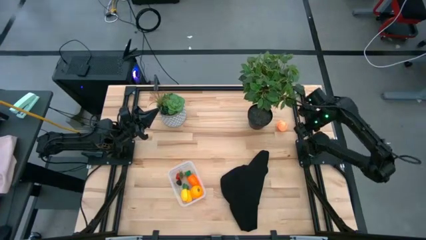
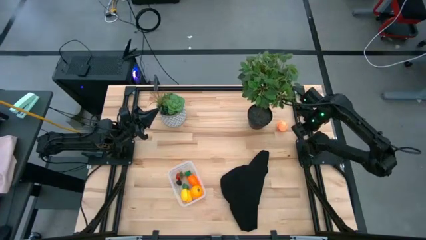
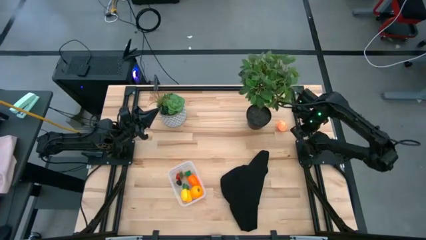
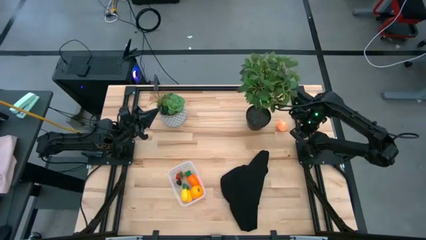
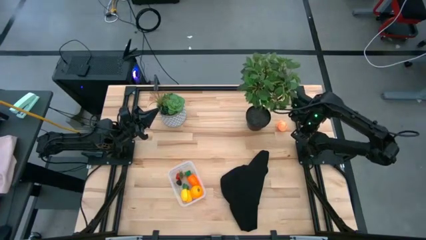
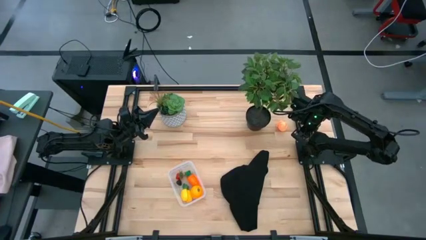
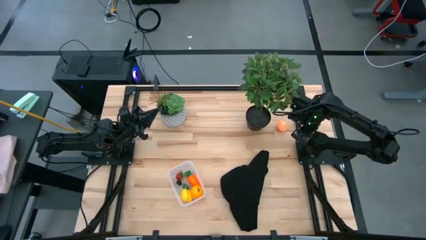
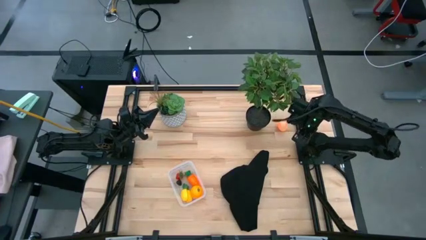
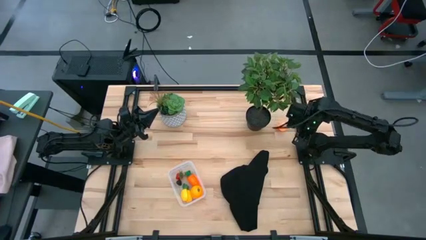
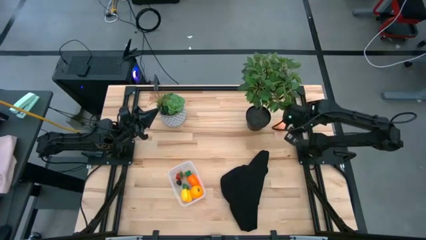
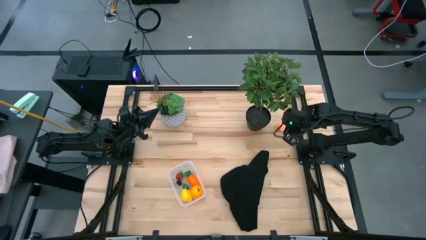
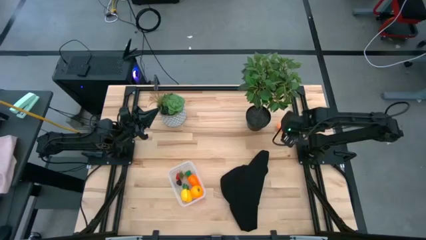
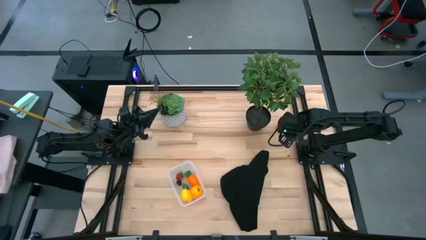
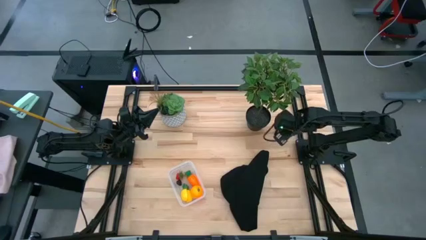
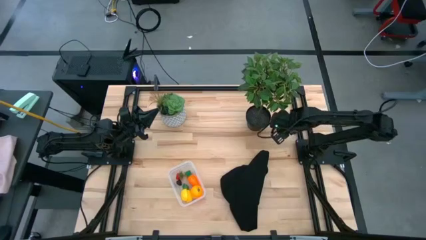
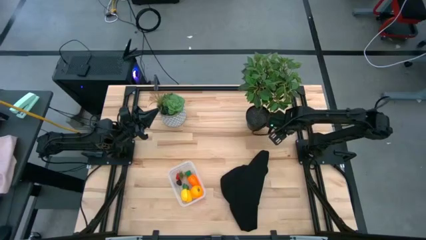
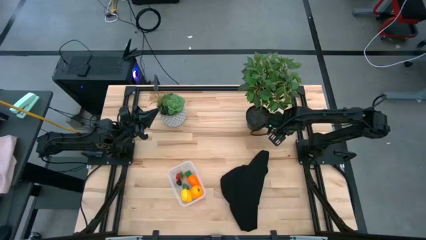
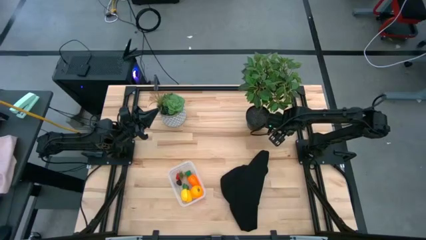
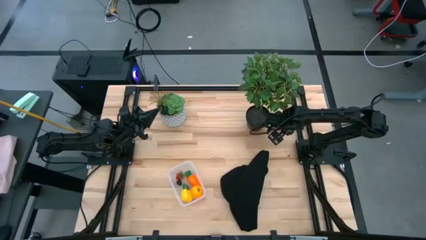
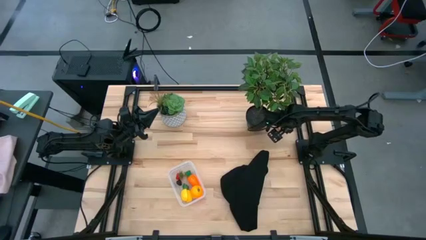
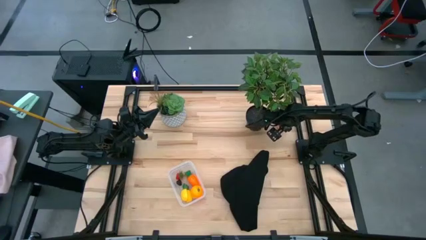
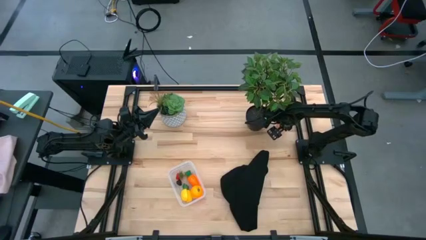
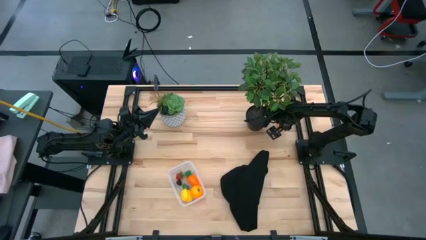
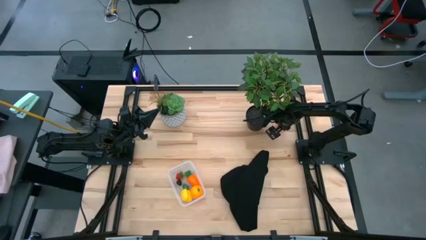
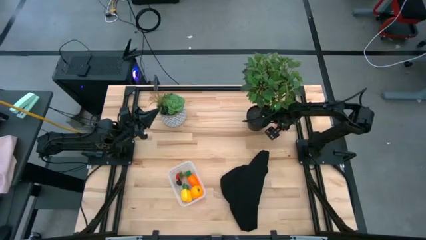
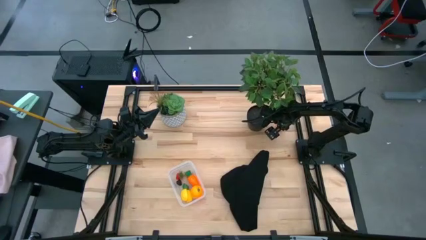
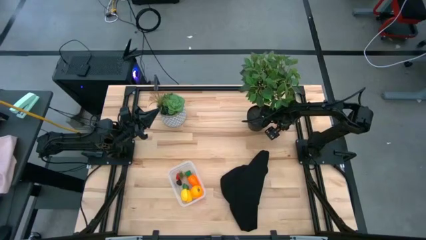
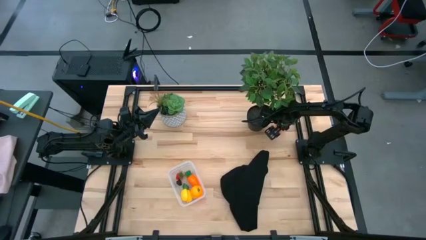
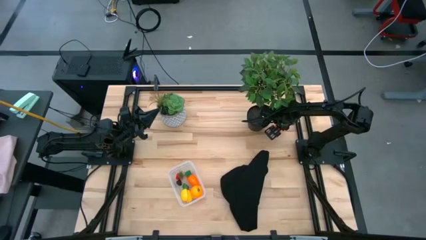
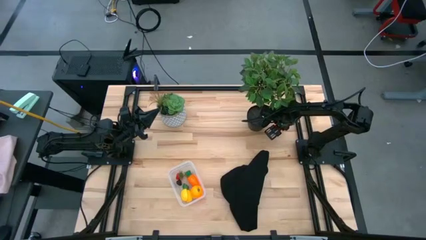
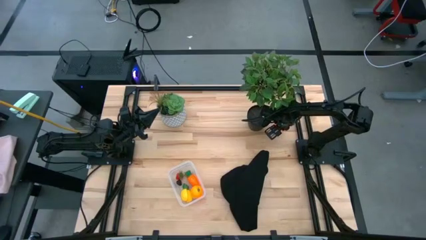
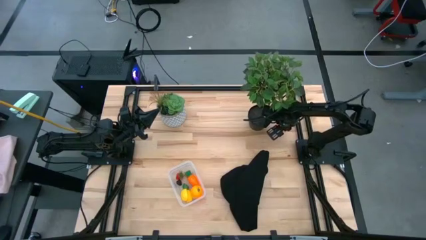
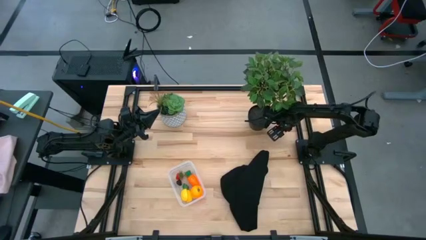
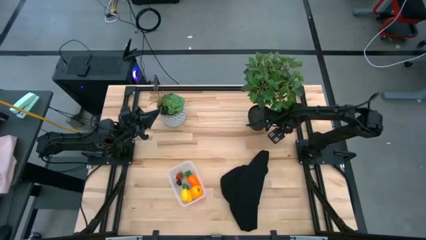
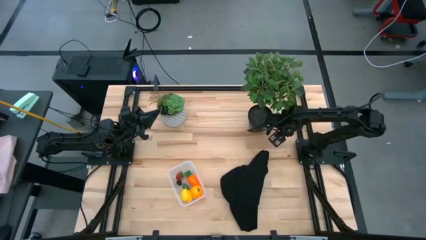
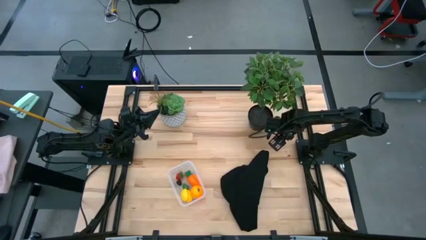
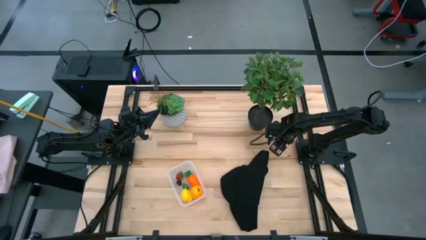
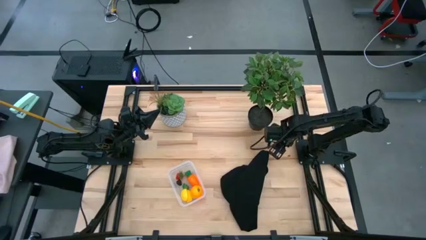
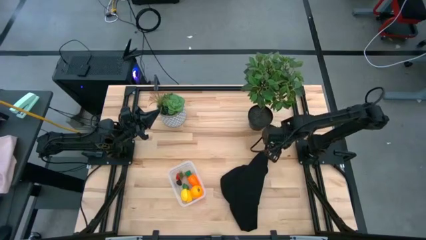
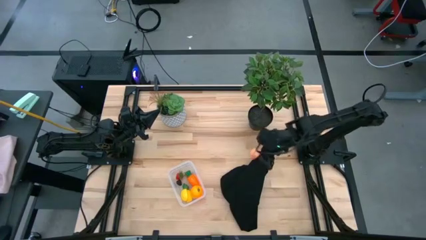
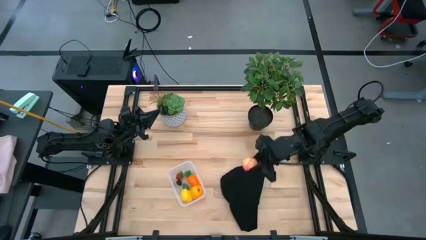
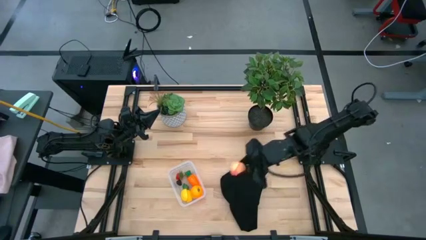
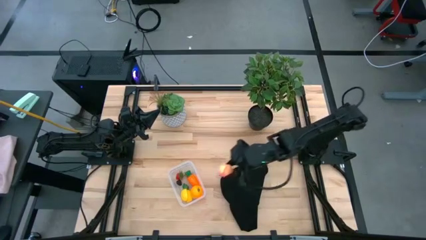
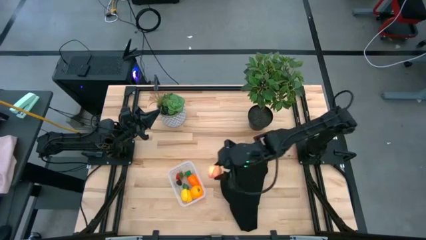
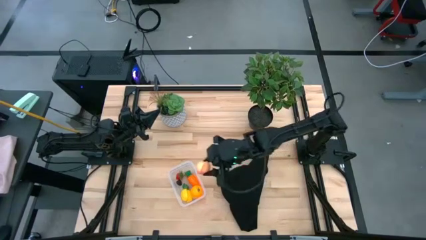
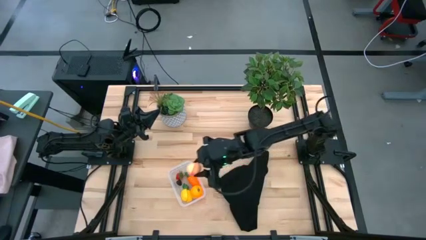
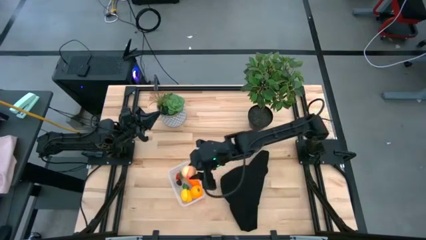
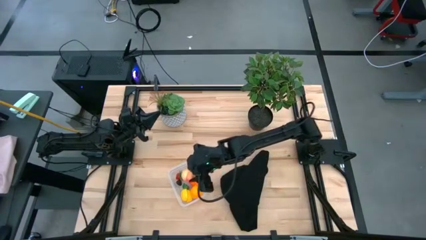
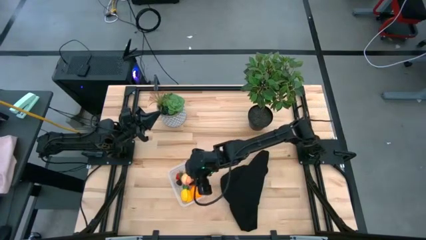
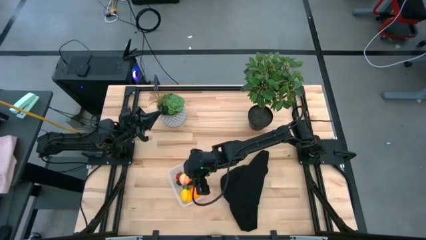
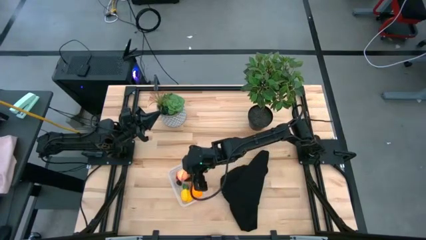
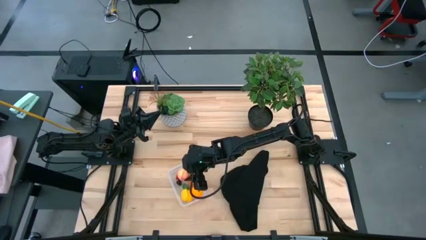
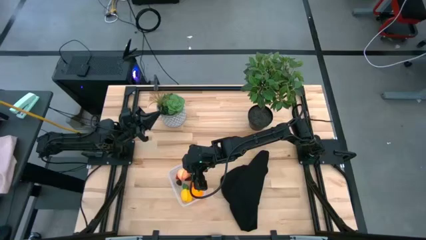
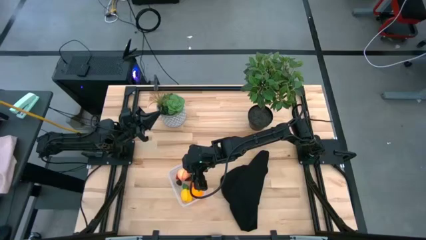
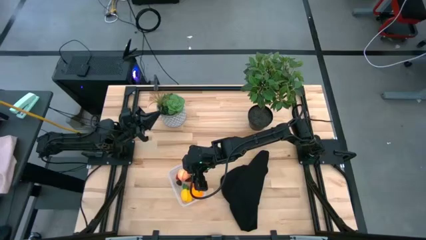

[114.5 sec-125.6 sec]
Task: Pick and placing Produce into tupperware
Put the peach into the transparent bin

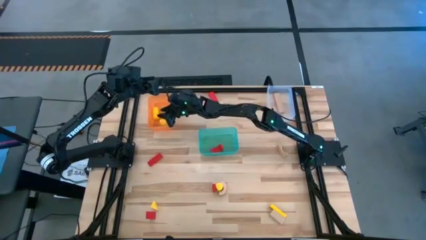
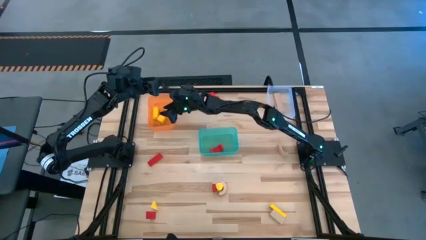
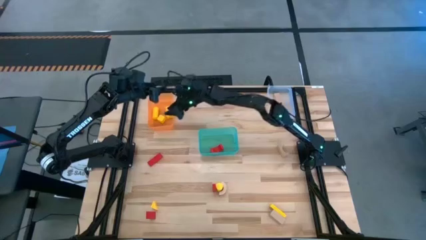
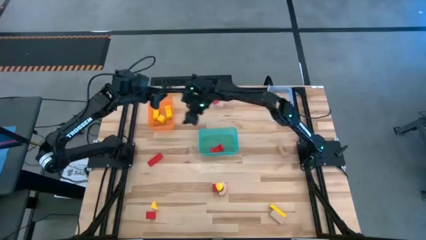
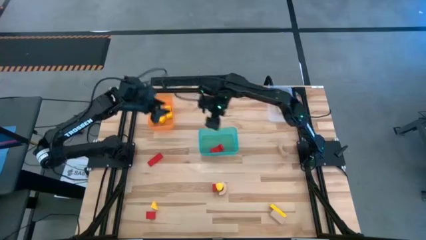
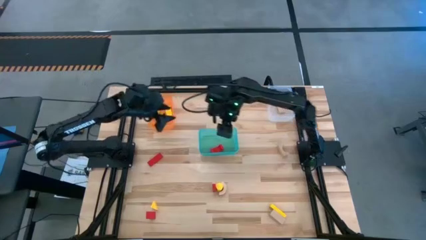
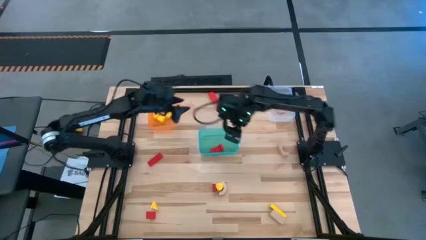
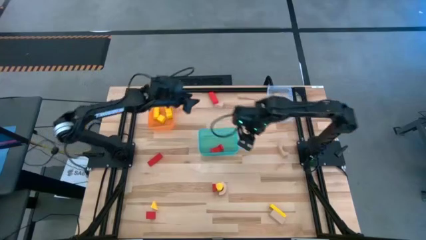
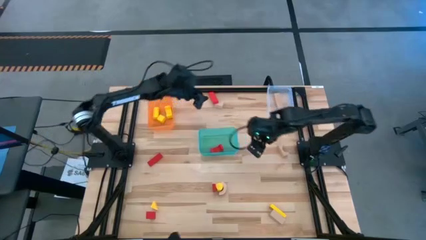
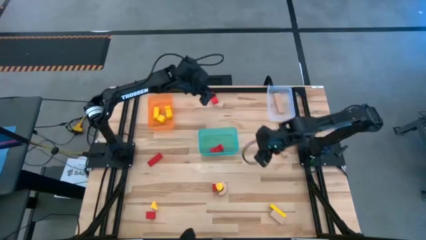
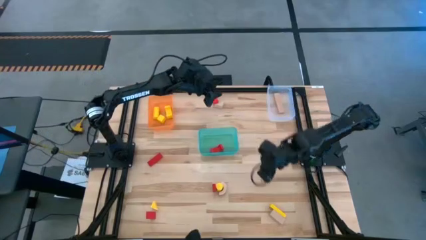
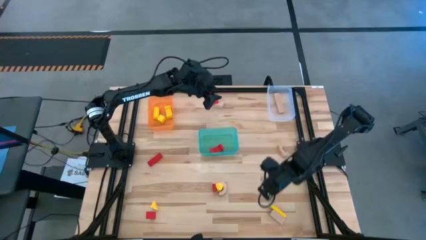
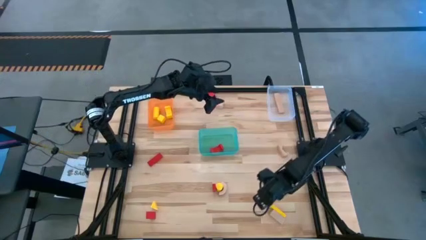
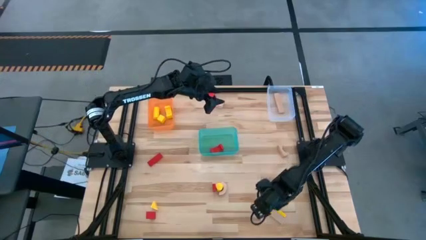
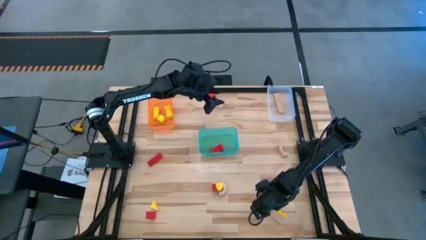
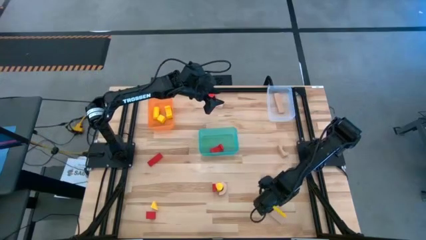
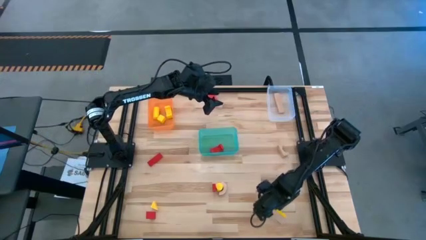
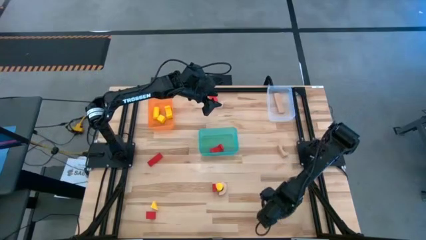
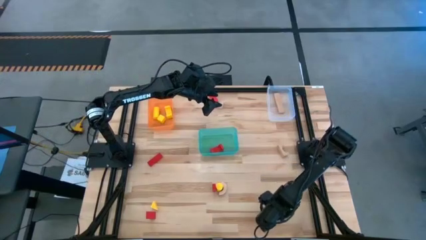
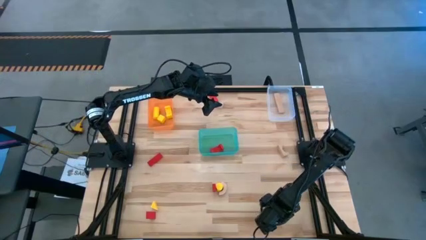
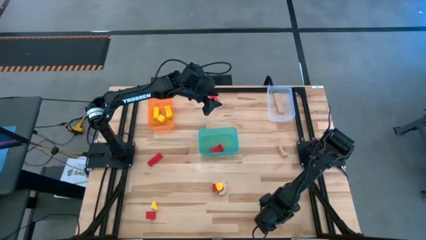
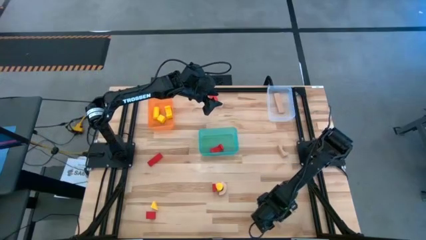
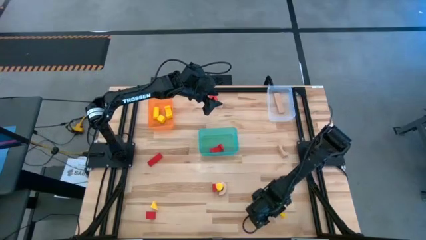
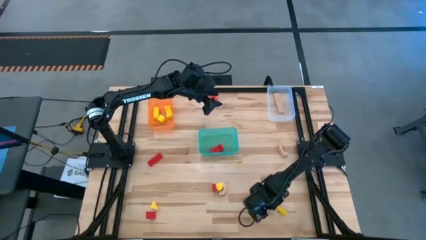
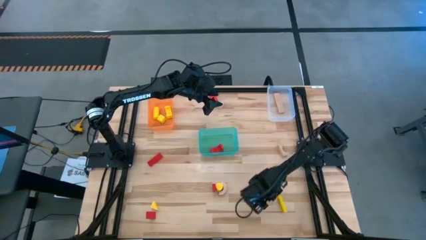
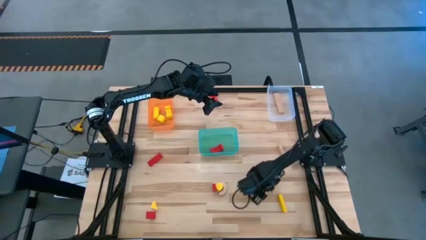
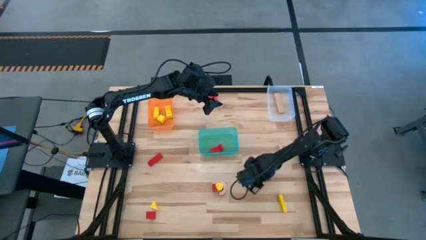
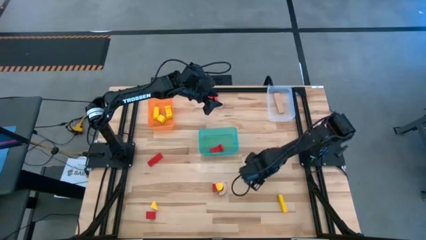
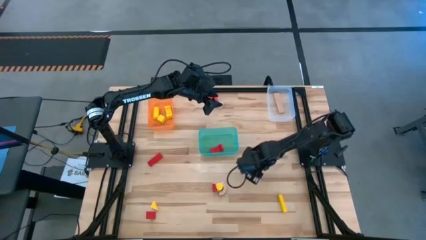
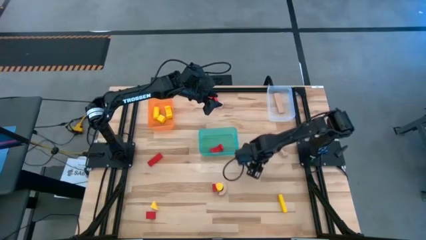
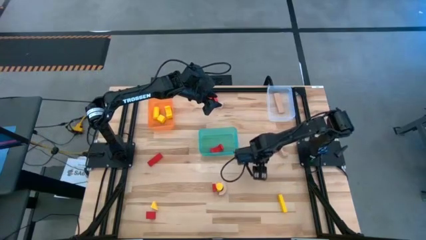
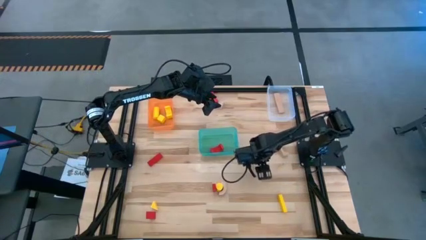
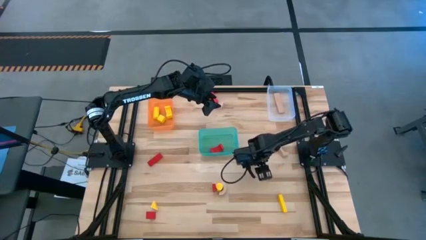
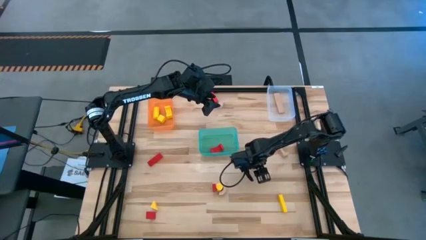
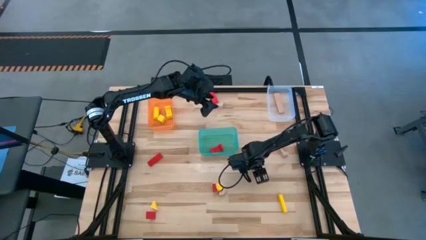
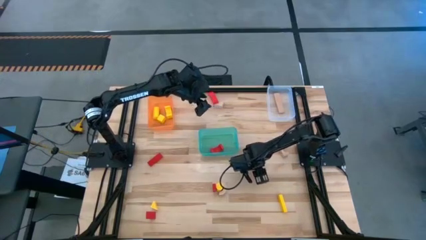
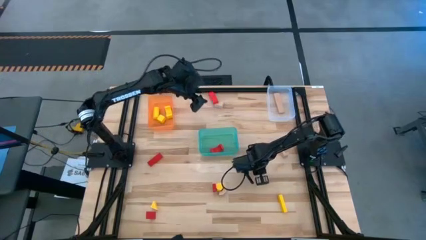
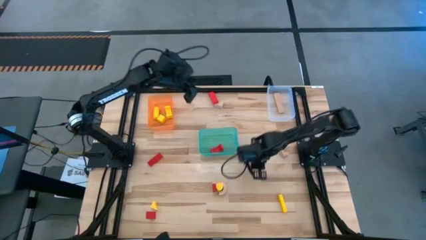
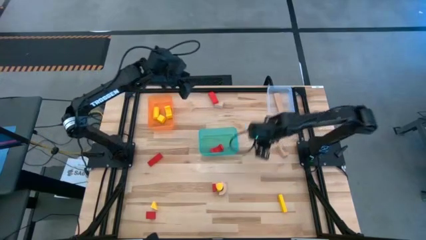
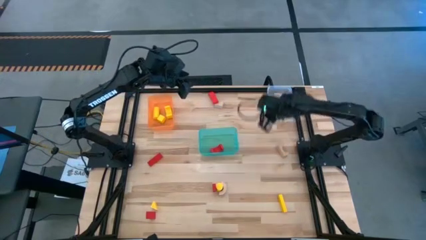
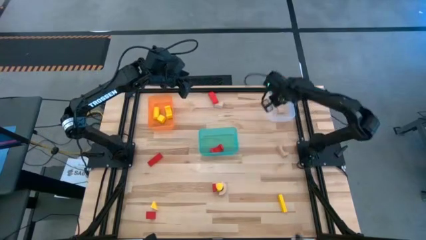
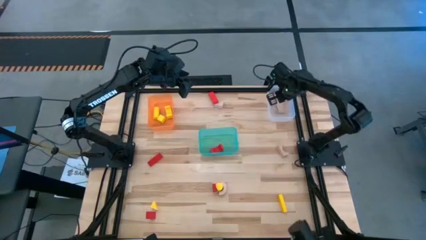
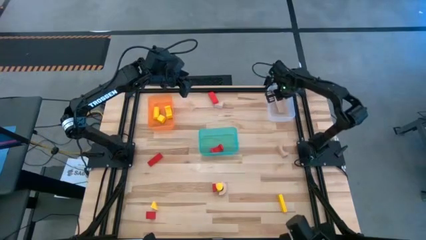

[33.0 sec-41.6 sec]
Task: Sort & place blocks by color
Put the brown block into the transparent bin
